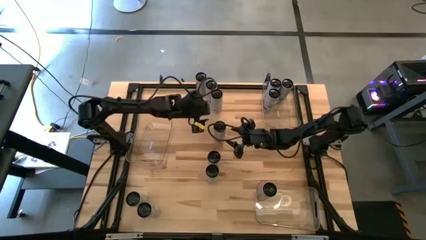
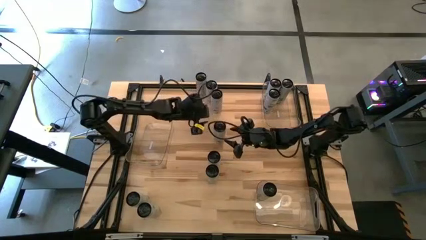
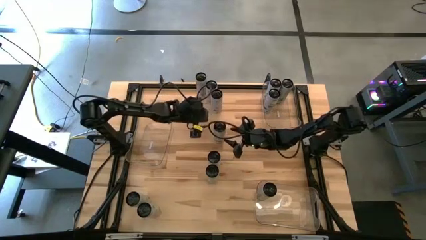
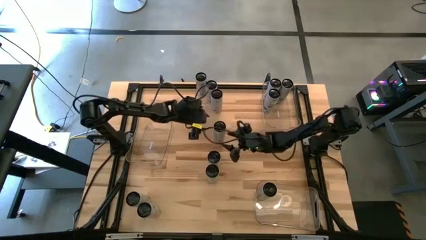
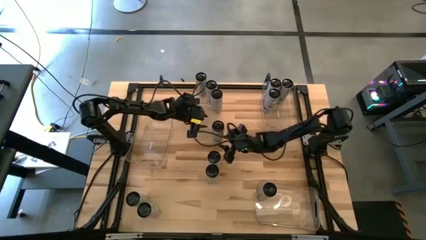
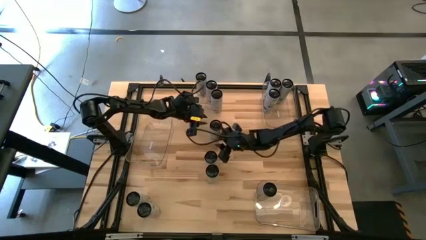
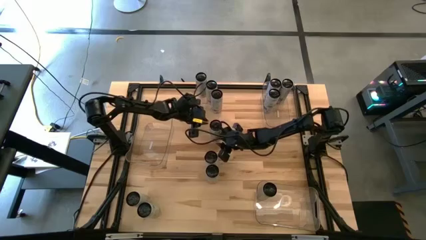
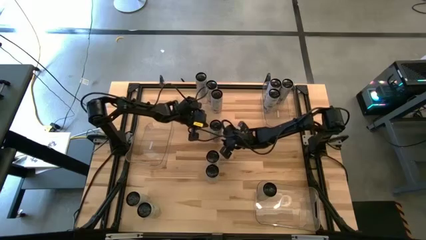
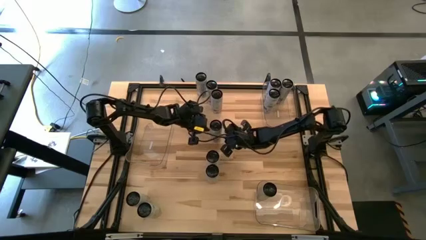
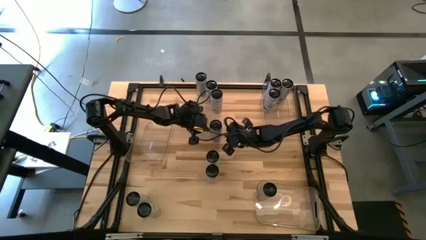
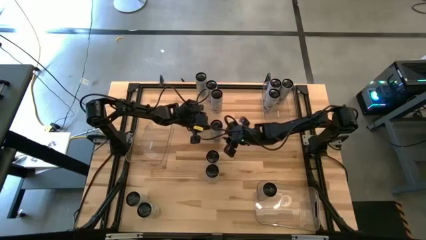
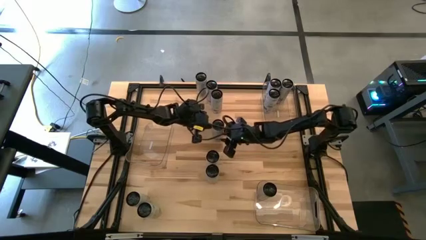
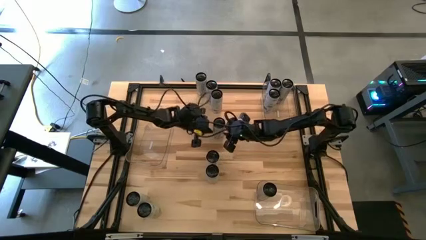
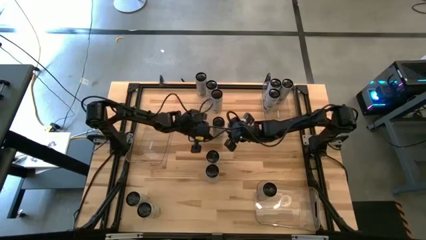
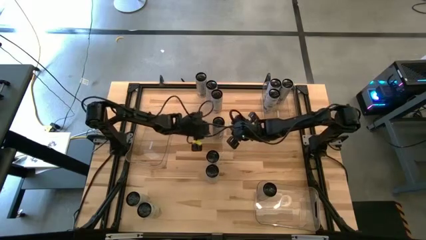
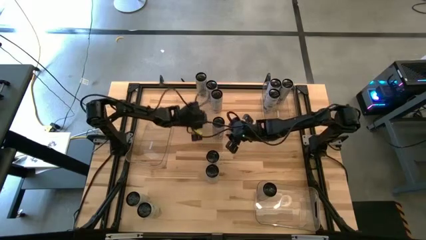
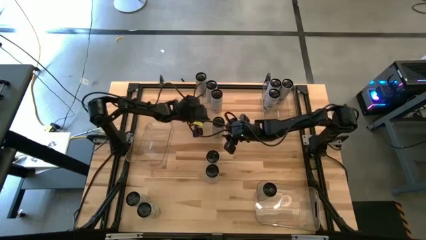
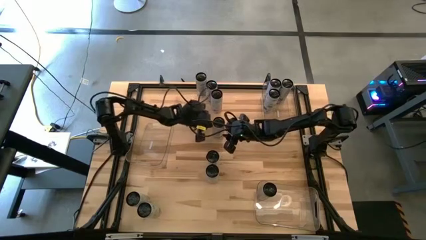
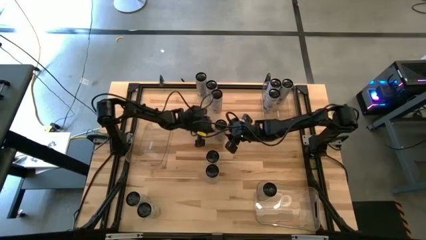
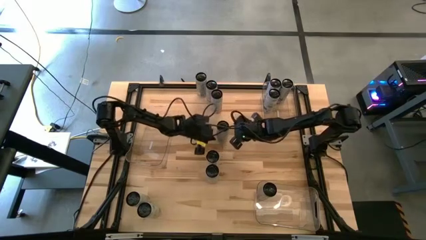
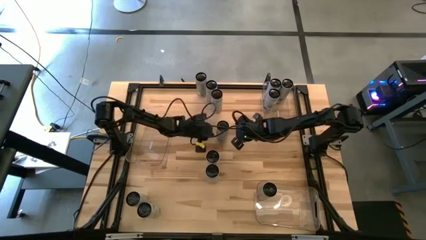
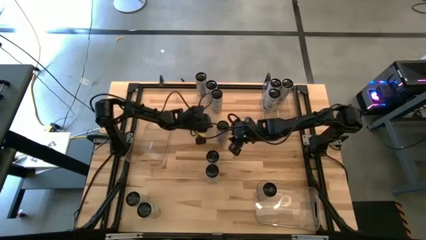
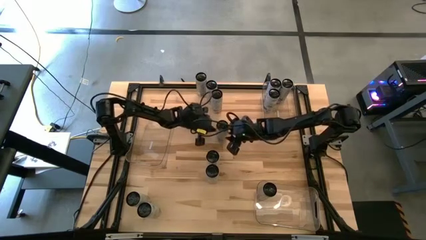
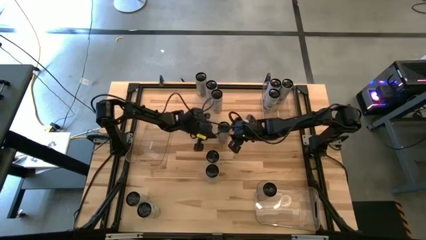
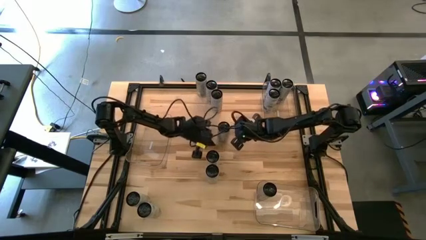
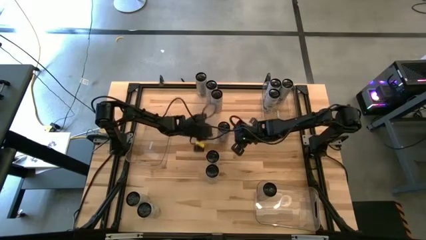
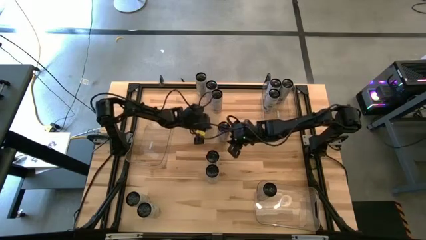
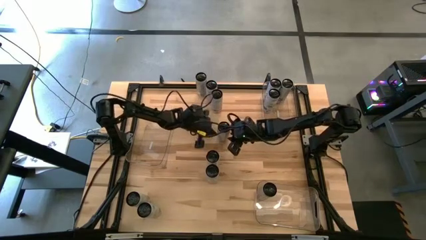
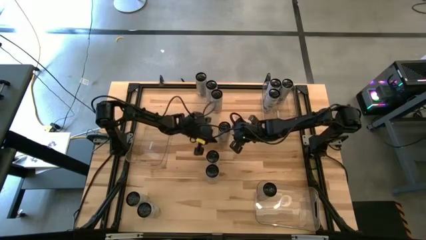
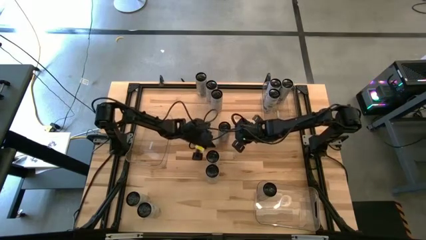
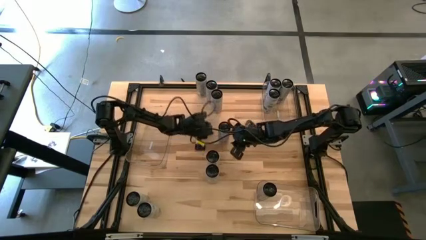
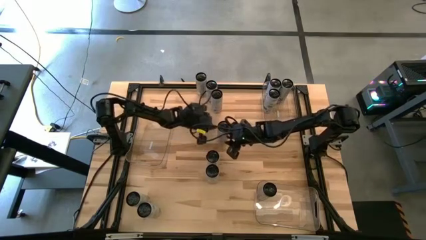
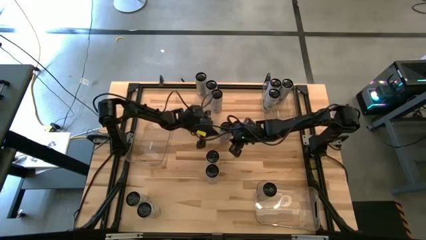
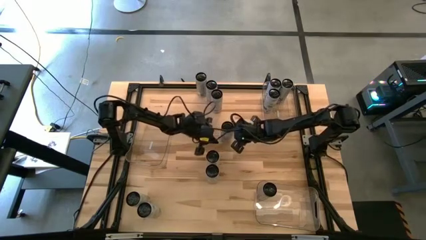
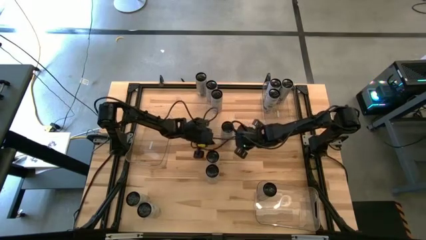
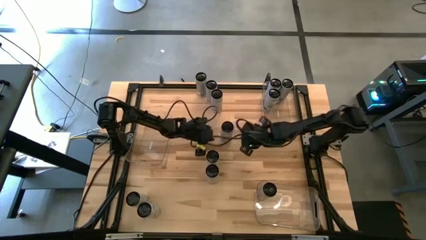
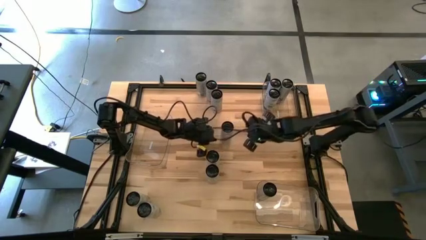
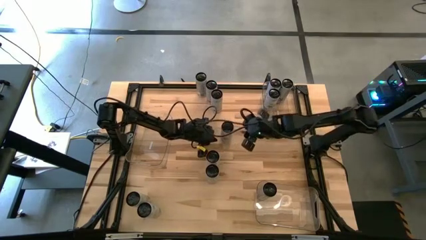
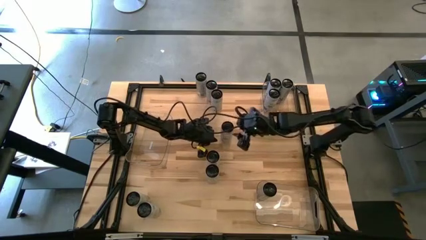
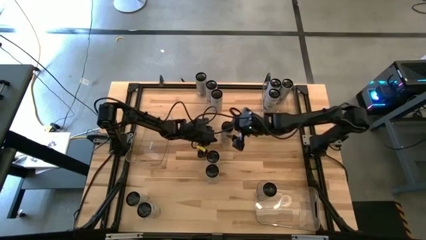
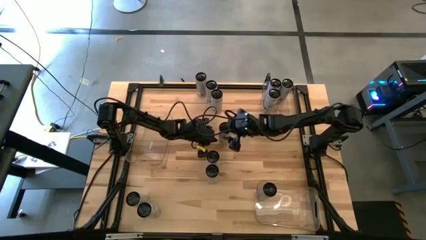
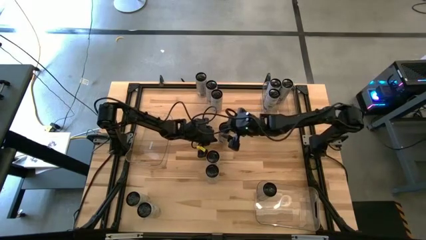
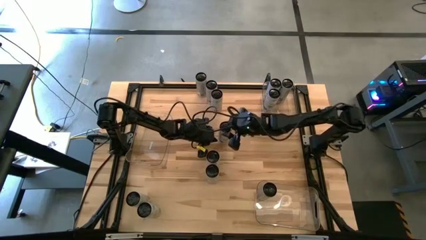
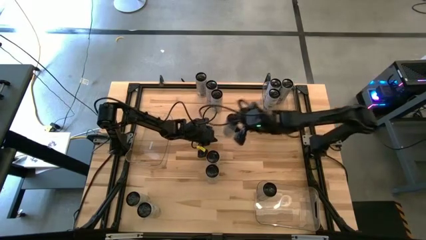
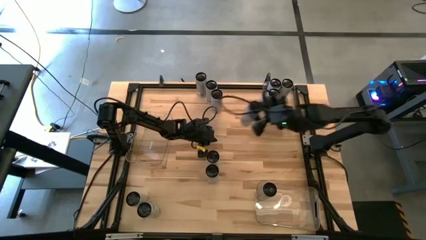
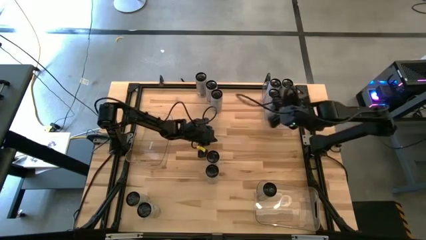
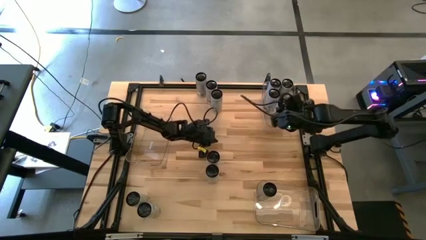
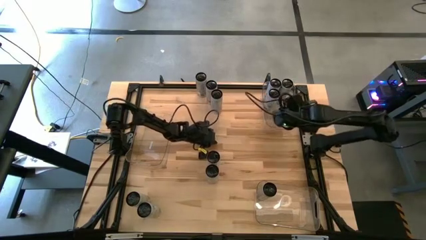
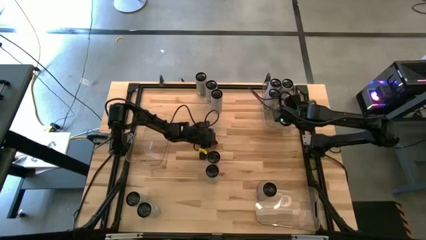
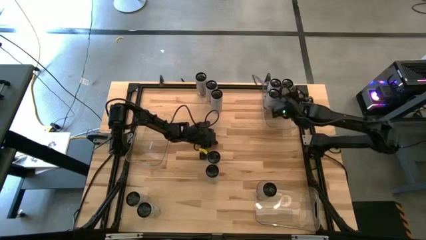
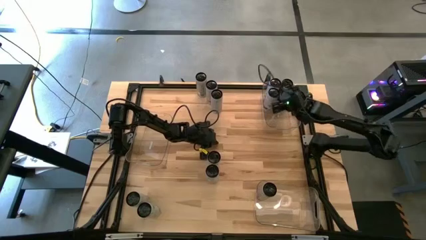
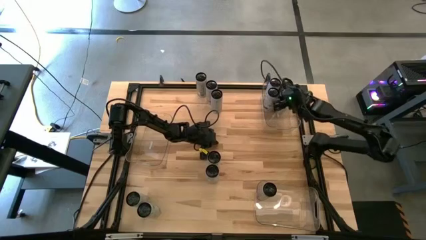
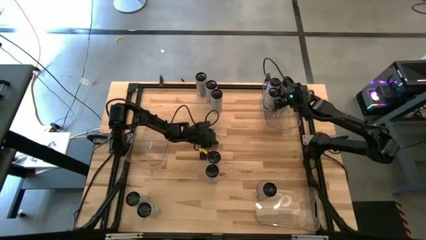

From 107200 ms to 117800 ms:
Task: Sort soda cans
Put the white-blue soda can into the top transparent bin

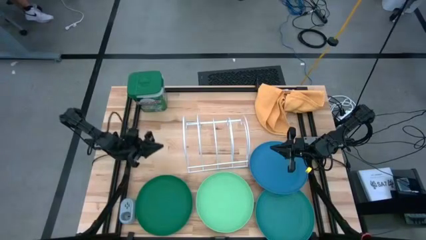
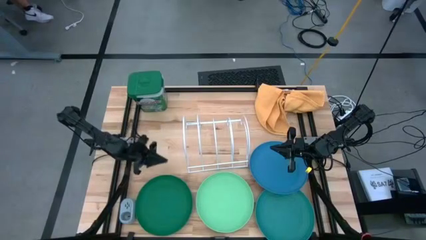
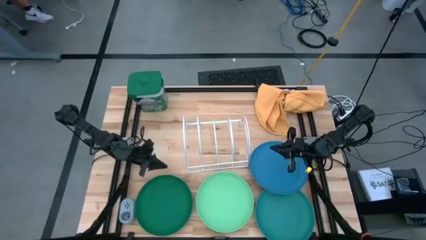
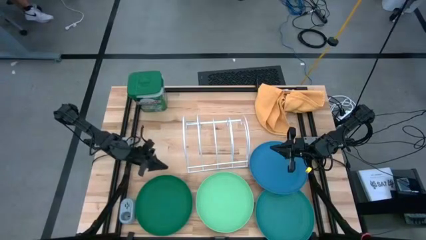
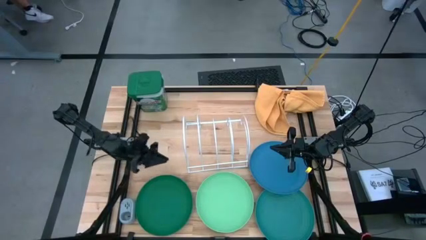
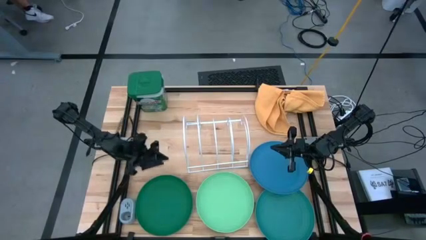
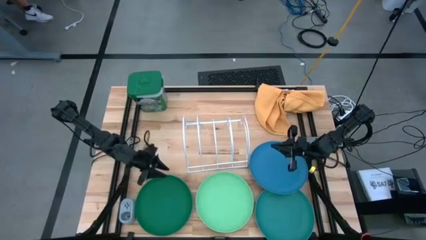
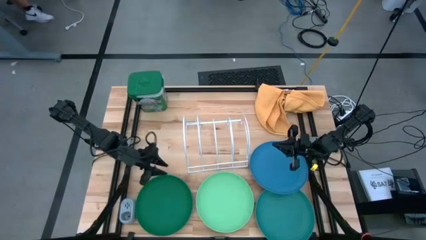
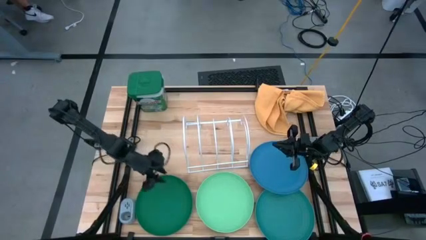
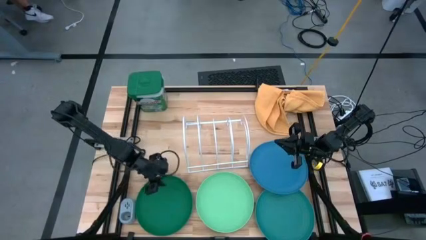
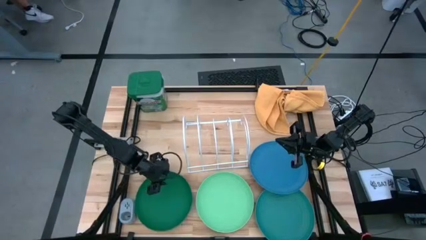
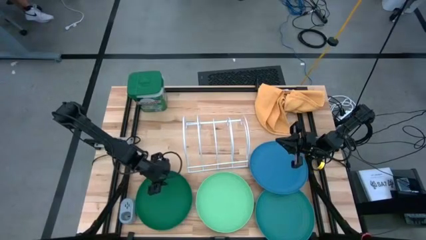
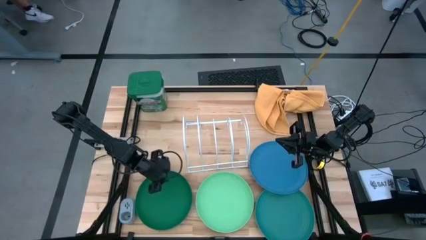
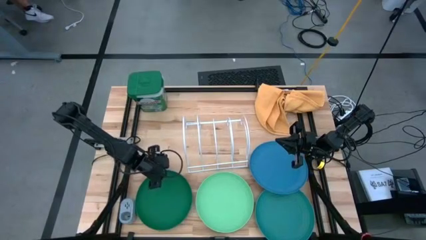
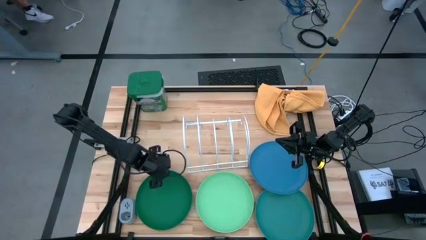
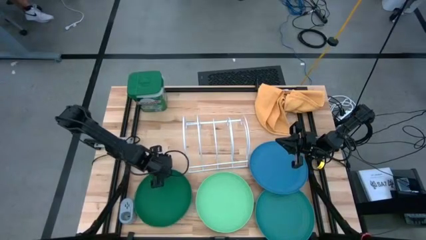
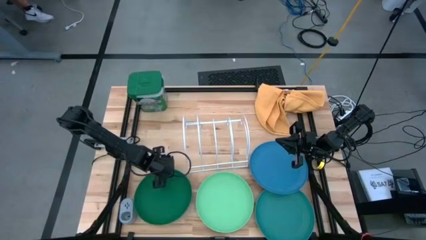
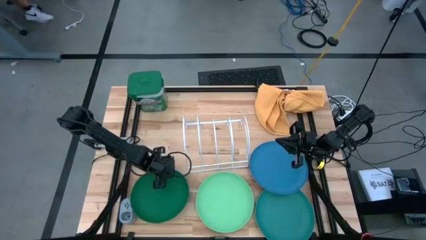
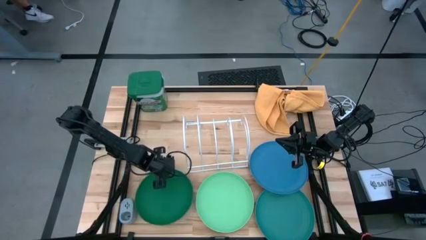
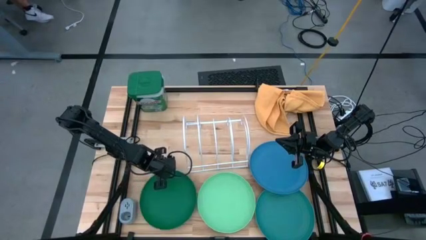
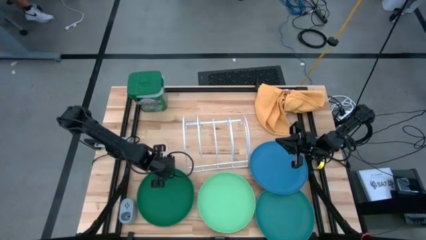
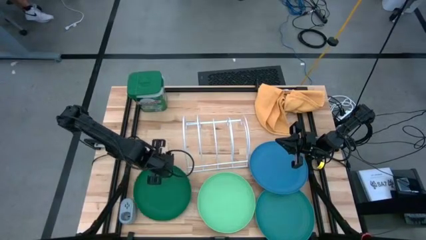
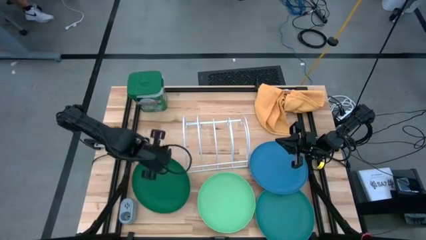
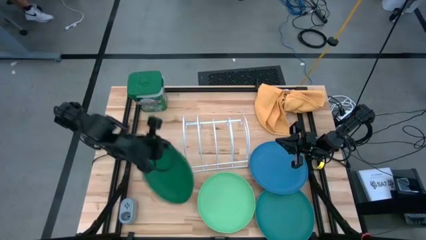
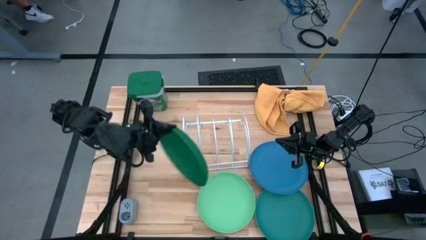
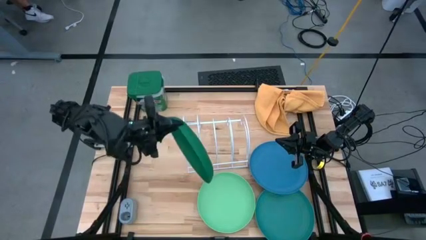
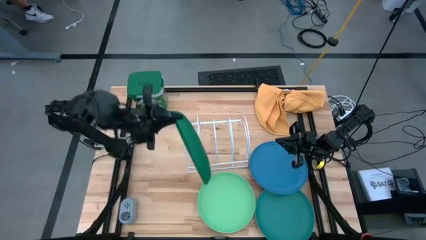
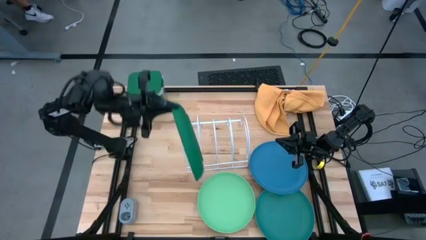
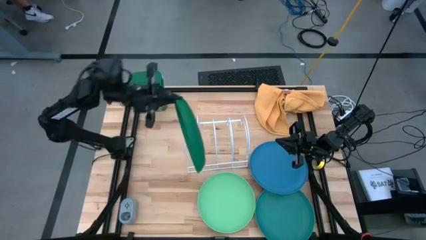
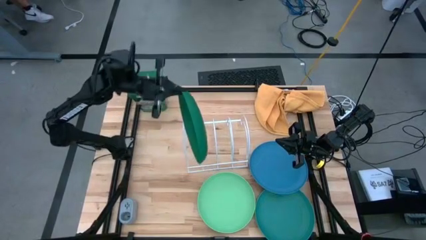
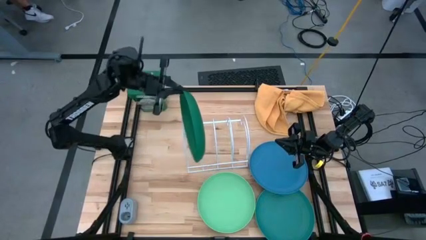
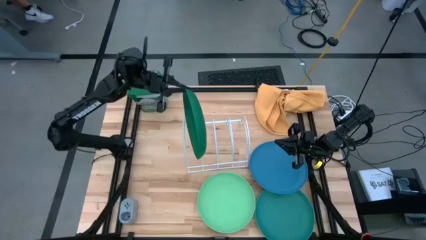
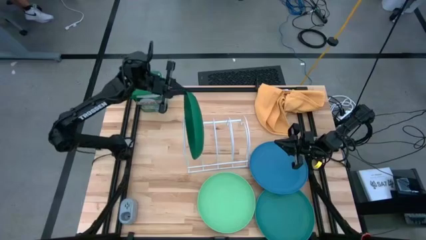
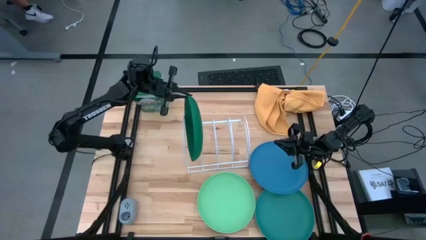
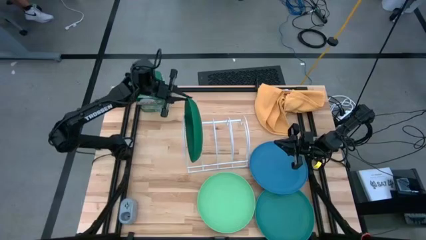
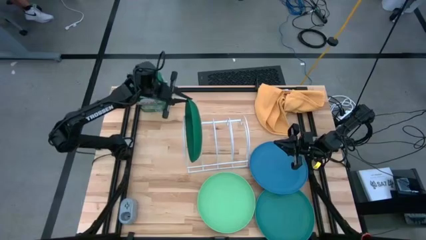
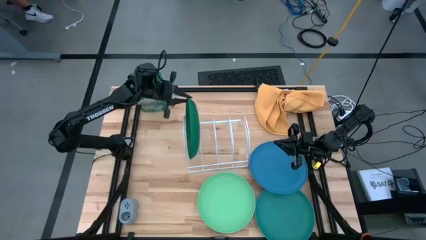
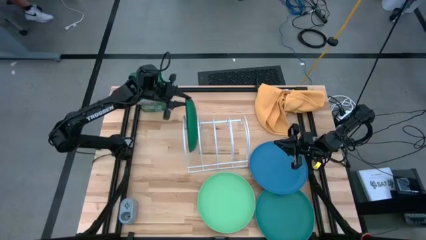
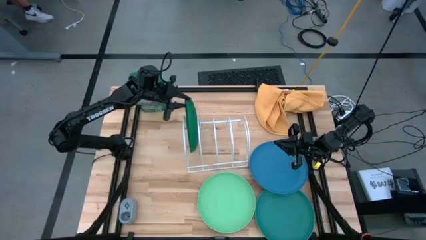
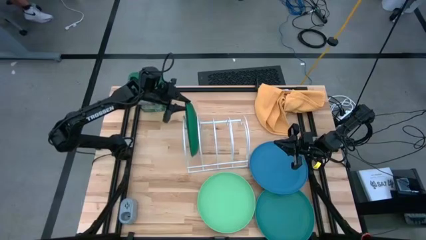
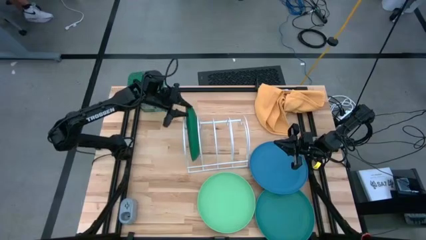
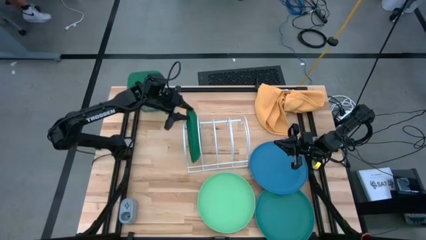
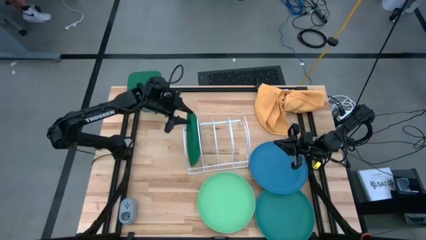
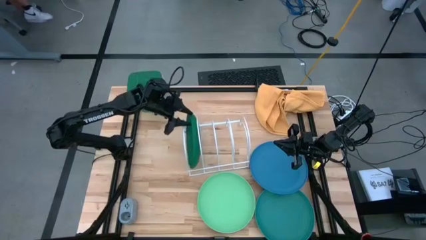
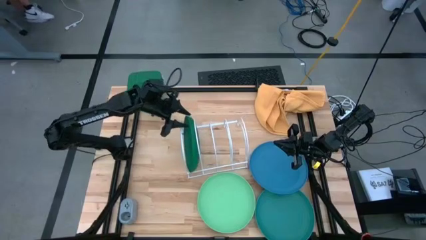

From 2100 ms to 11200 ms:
Task: Sort dishes
Put the green plate in the dish rack
